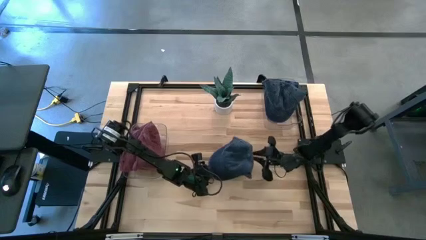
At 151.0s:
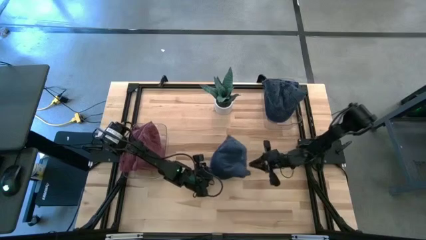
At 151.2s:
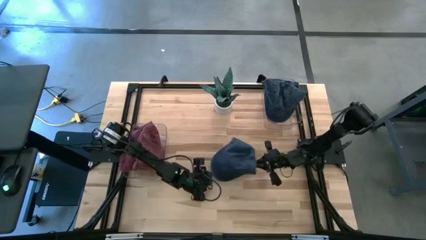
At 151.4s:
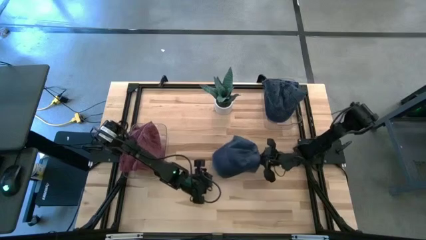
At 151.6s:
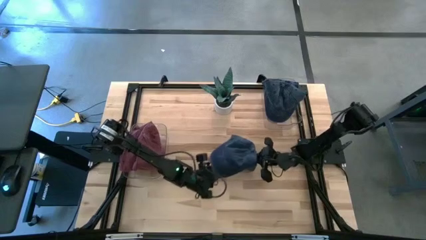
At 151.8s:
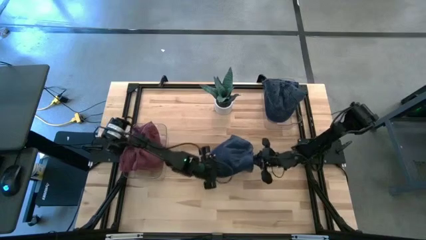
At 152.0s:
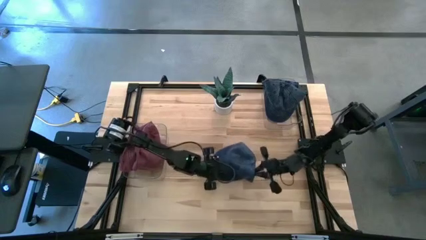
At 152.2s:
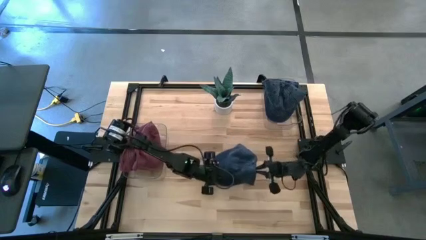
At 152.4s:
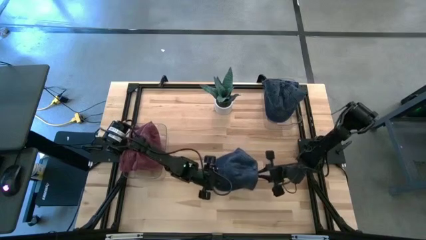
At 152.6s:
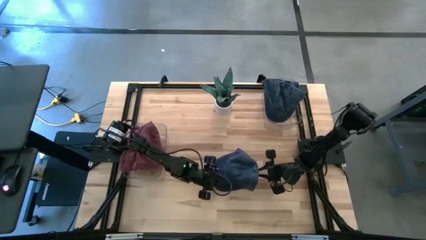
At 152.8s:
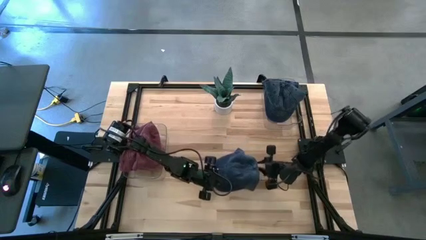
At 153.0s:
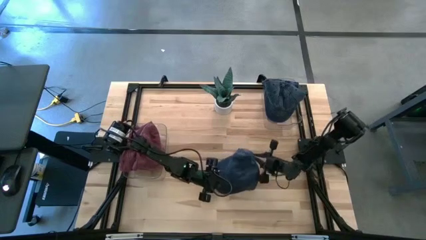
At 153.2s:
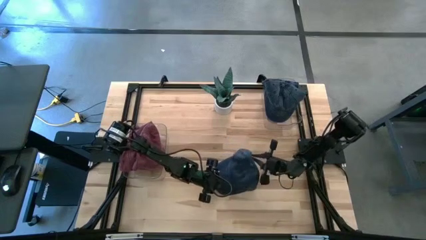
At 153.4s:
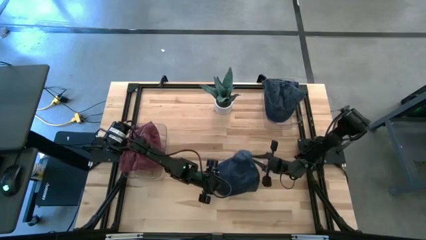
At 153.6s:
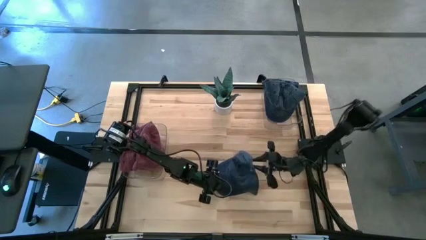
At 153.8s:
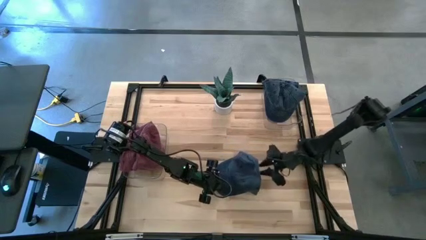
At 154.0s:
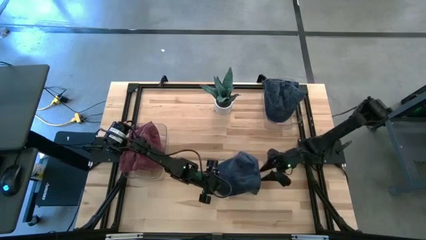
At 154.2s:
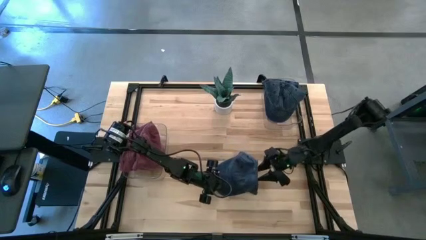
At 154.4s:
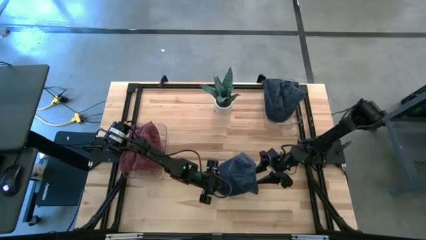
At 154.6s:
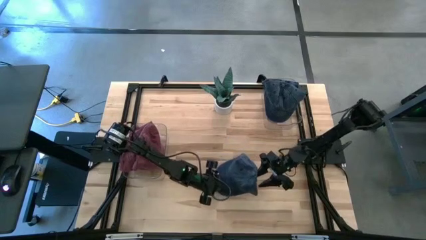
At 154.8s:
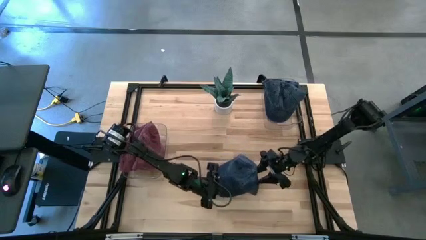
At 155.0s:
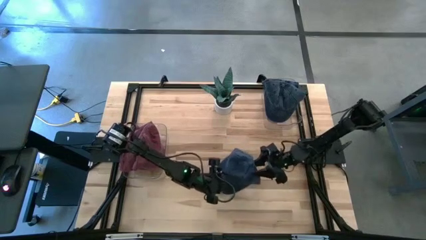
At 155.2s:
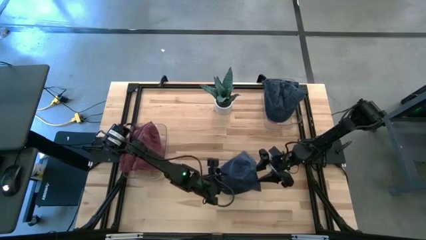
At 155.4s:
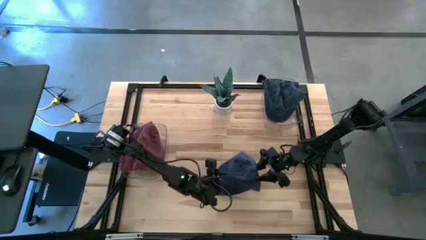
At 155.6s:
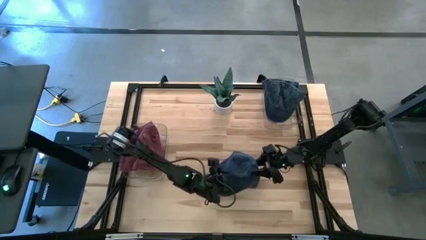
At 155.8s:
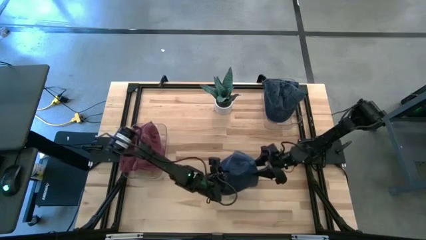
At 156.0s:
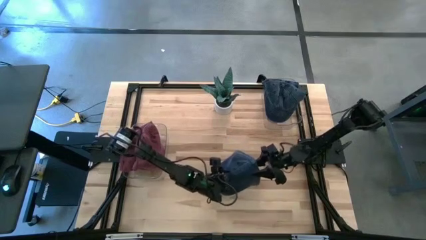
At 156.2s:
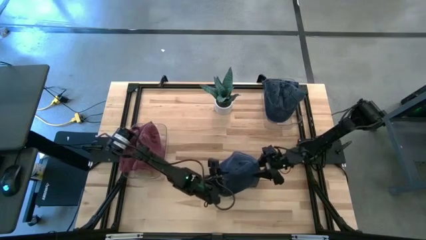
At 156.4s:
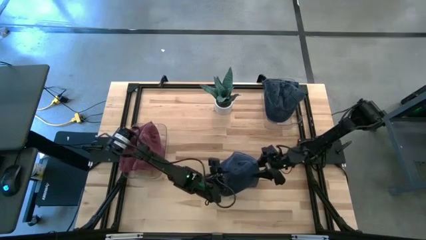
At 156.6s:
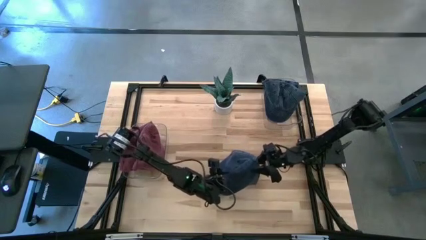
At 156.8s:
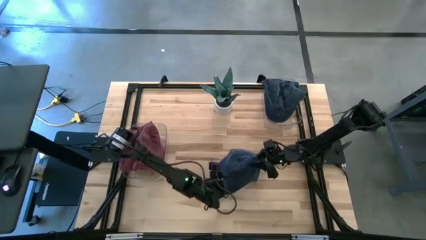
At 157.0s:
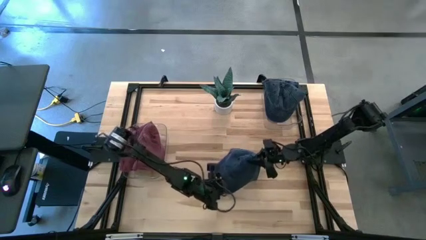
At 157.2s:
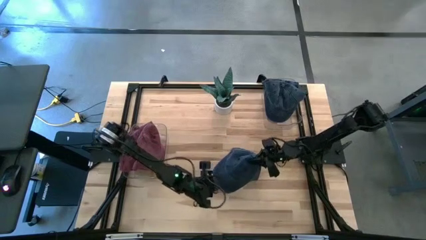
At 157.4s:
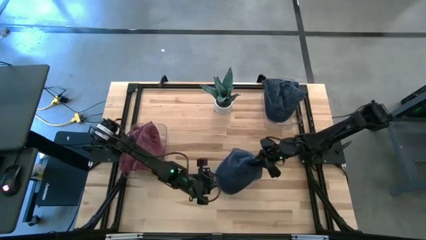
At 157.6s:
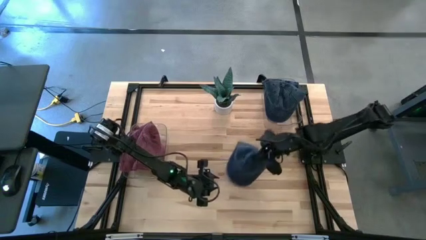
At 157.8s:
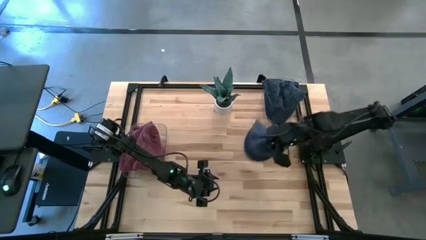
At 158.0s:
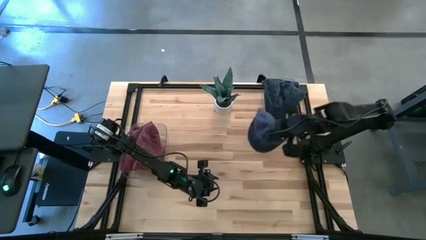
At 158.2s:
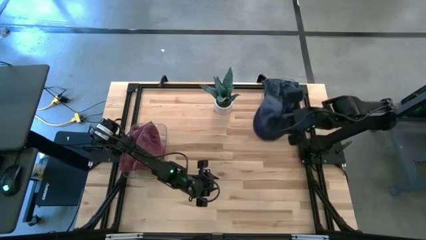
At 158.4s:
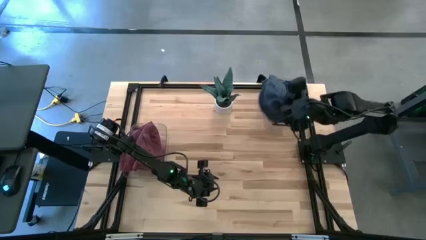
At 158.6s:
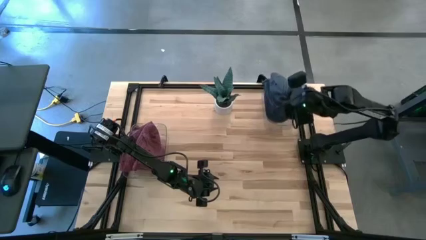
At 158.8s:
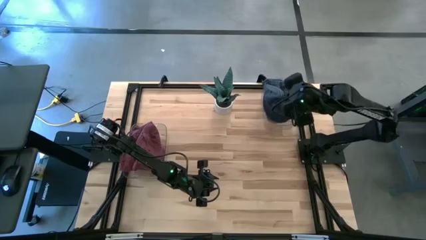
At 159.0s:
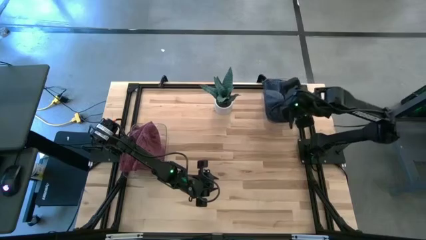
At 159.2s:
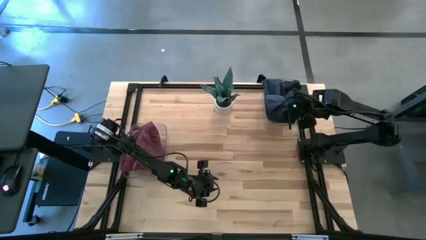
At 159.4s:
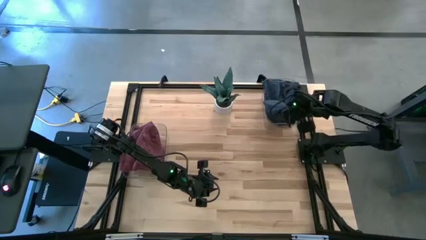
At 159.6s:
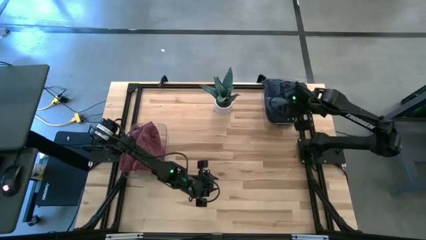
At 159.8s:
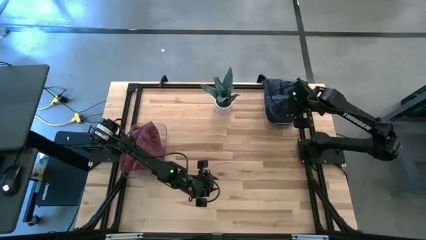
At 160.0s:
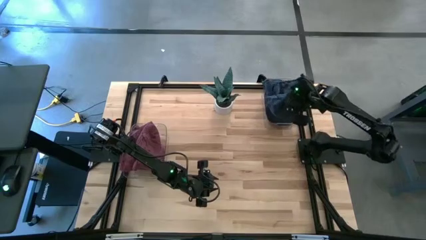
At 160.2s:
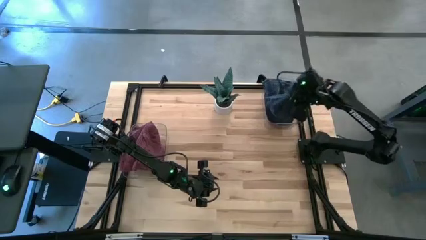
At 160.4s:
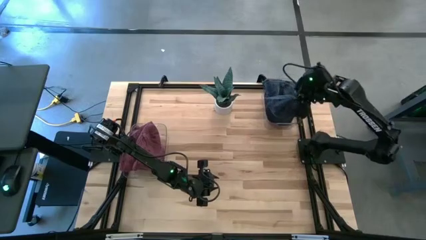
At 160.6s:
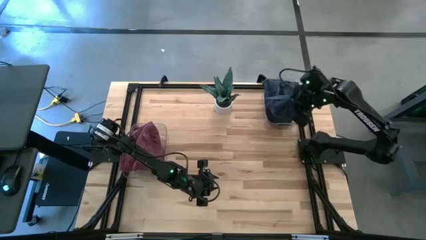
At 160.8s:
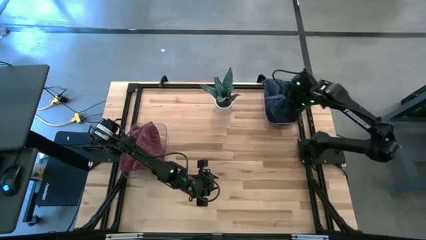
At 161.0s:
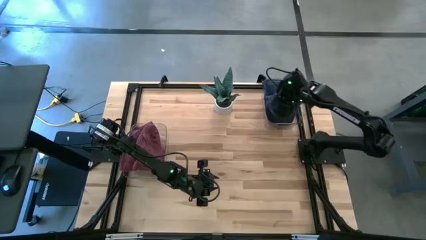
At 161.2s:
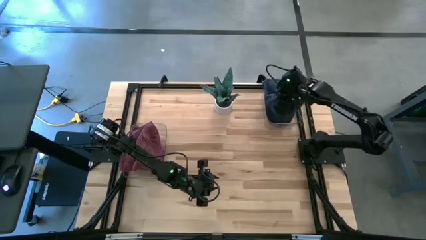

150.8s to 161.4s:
Task: Pick & Place hat
Put the blue cap into the right transparent bin

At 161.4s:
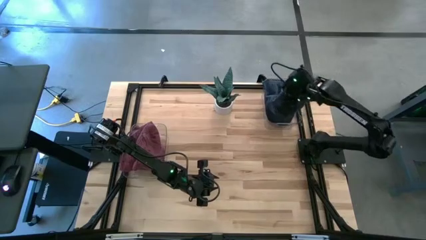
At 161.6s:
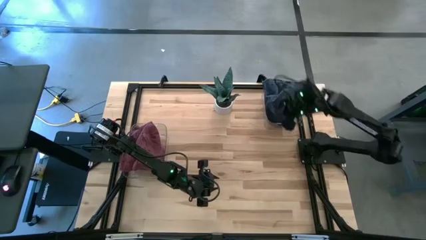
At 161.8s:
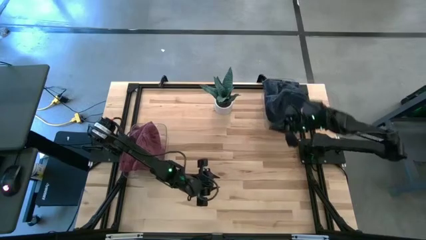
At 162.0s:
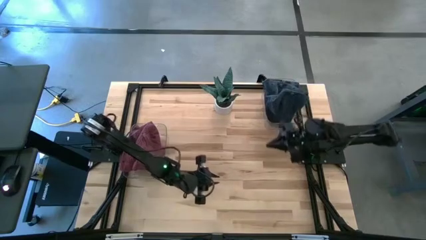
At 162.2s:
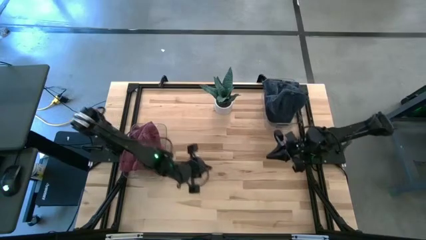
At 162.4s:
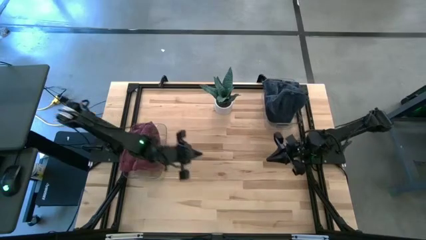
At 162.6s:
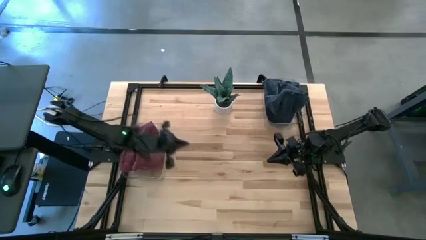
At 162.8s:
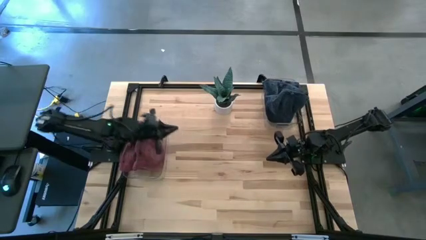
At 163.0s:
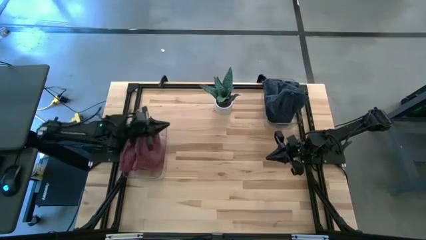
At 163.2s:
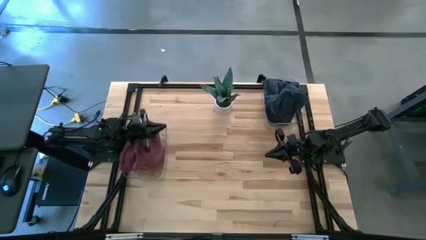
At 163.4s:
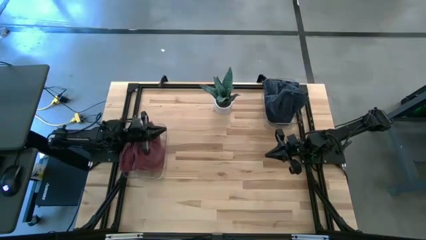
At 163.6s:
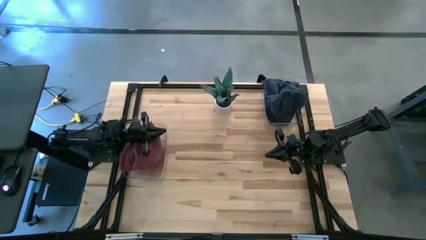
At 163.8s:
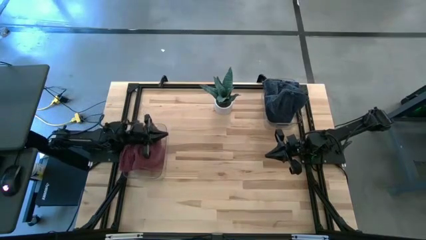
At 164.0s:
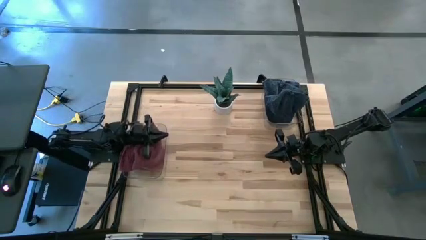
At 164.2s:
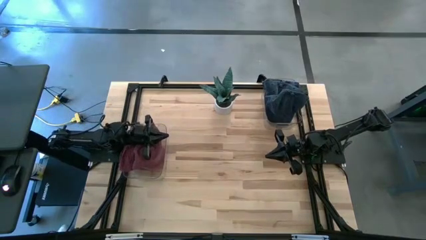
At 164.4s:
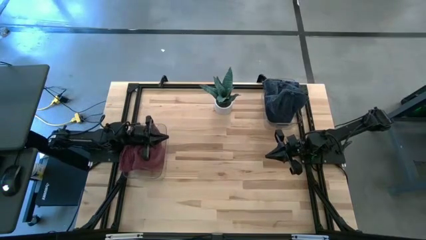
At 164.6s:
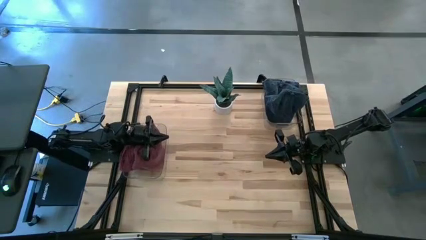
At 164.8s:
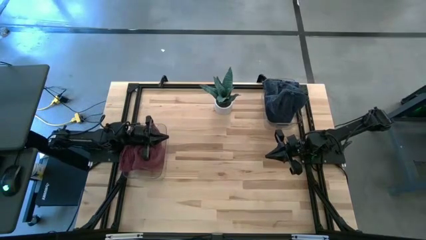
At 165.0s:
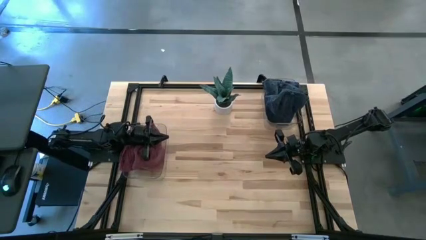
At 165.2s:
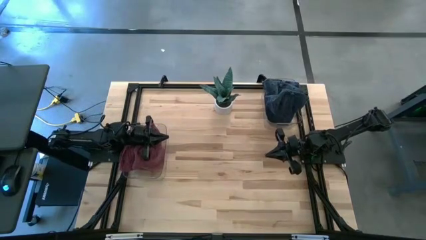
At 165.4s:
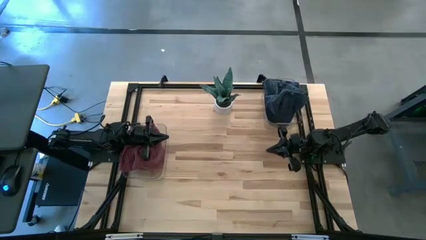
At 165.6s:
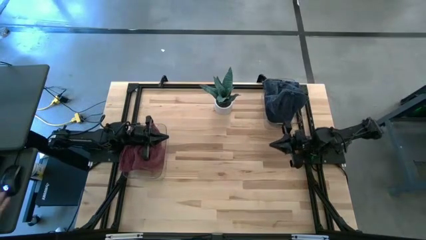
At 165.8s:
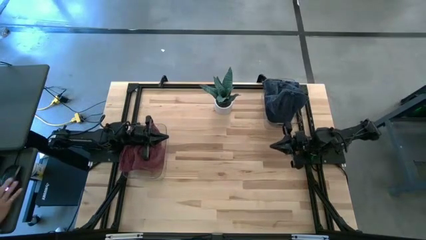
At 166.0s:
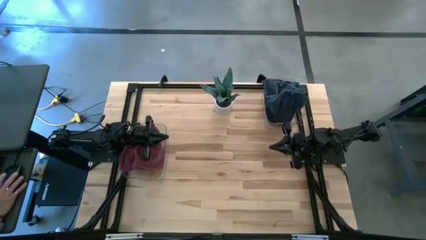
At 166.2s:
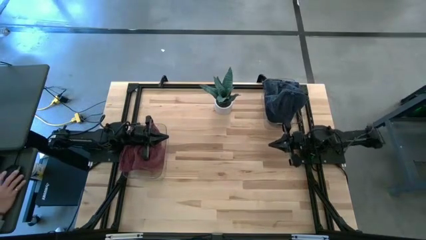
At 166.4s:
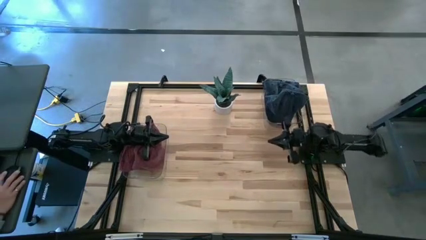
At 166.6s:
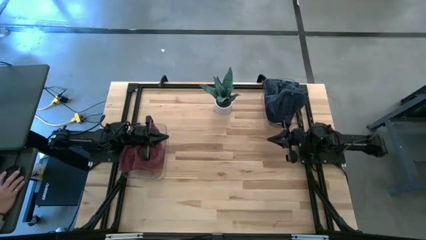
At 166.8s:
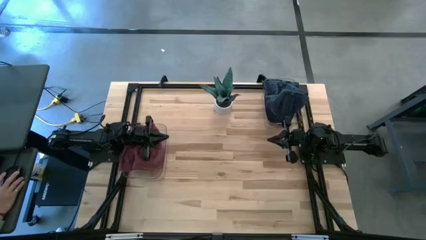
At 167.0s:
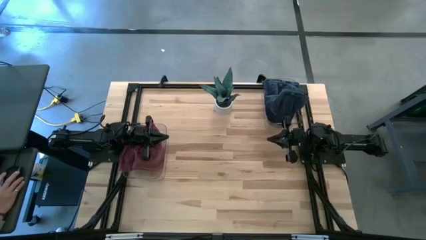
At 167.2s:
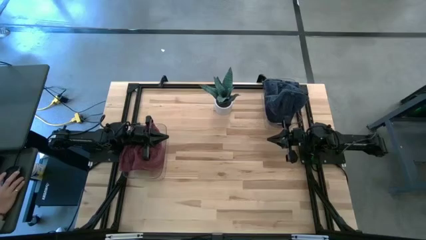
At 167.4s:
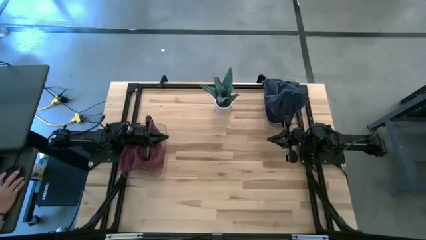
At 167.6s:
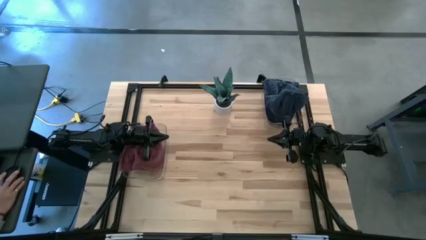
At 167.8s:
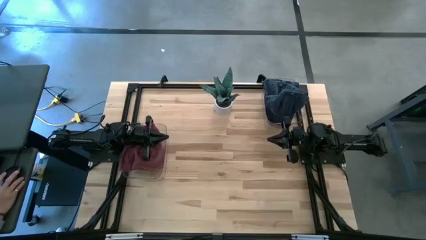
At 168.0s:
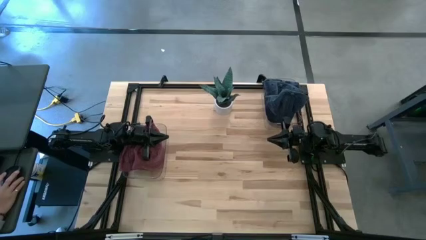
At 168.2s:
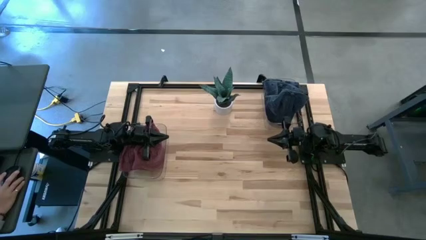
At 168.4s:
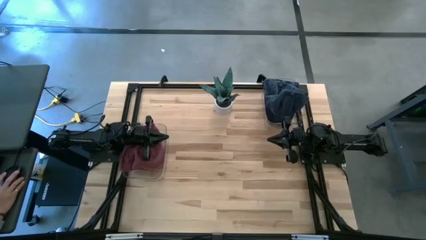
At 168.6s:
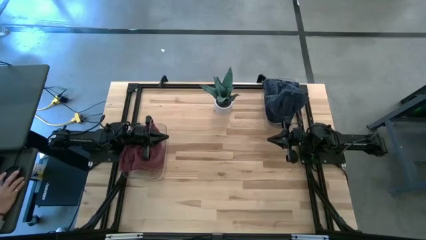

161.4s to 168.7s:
Return to Home Position
